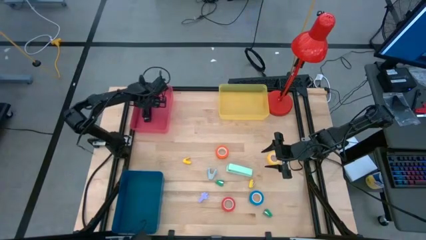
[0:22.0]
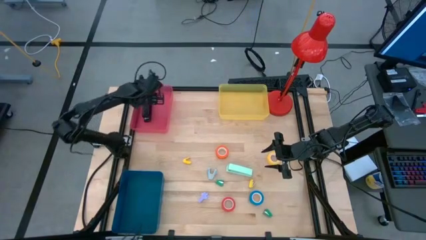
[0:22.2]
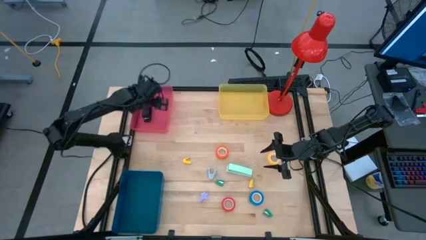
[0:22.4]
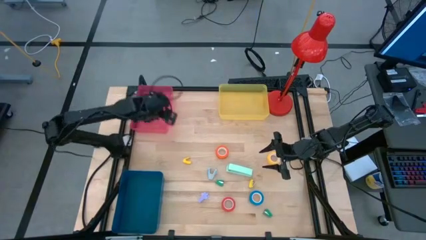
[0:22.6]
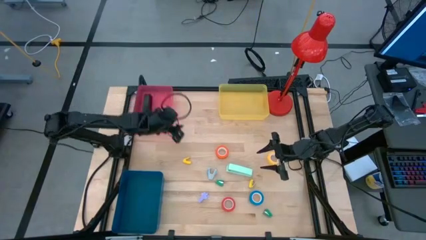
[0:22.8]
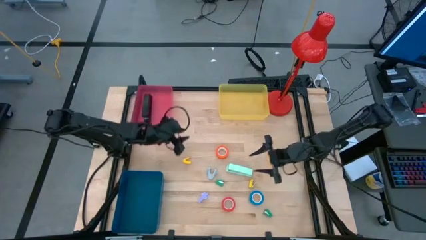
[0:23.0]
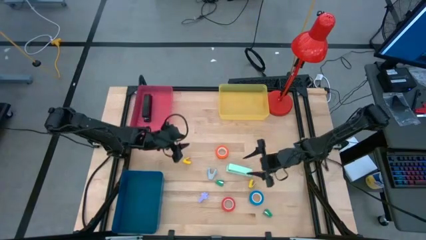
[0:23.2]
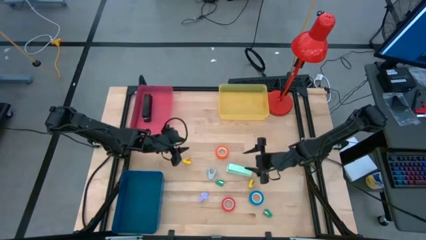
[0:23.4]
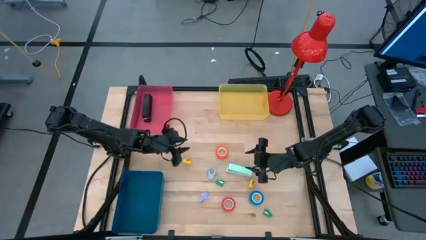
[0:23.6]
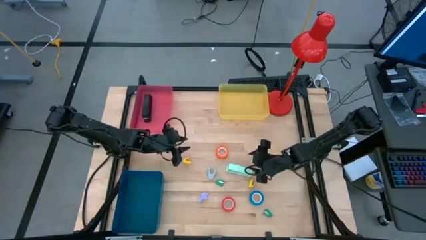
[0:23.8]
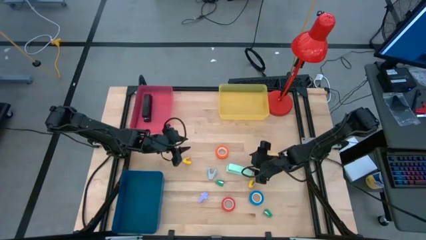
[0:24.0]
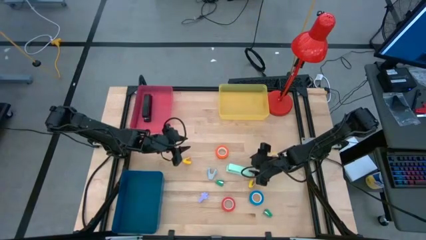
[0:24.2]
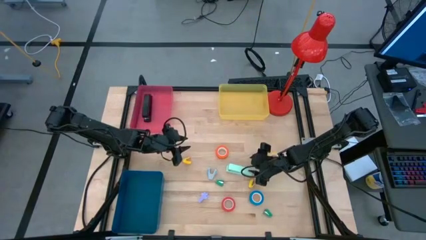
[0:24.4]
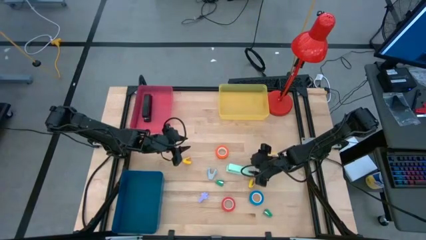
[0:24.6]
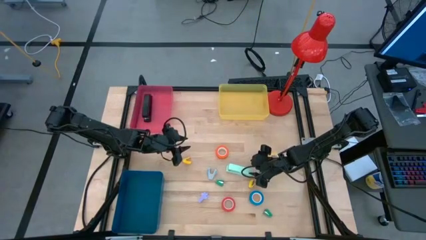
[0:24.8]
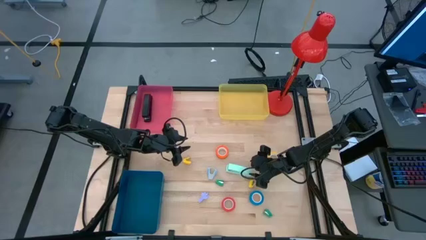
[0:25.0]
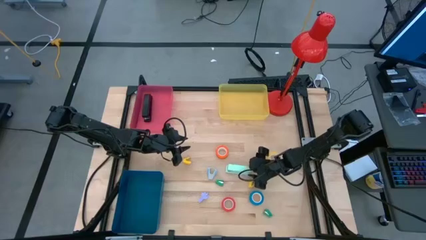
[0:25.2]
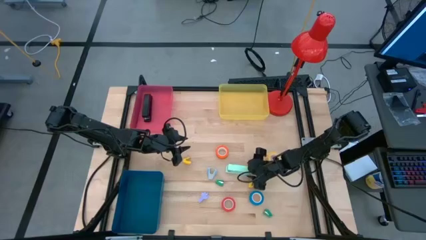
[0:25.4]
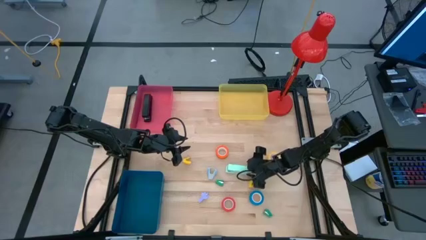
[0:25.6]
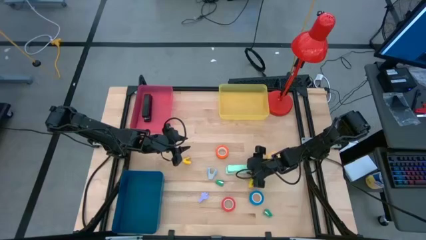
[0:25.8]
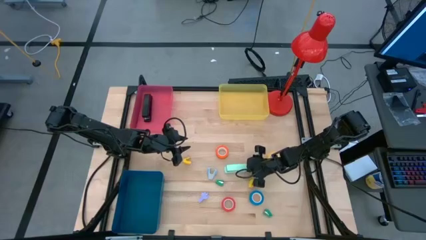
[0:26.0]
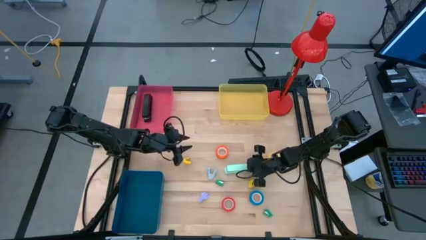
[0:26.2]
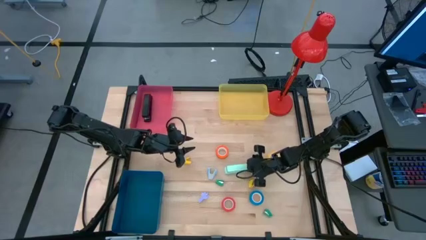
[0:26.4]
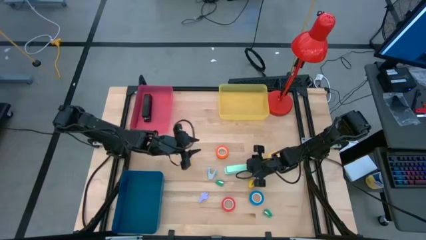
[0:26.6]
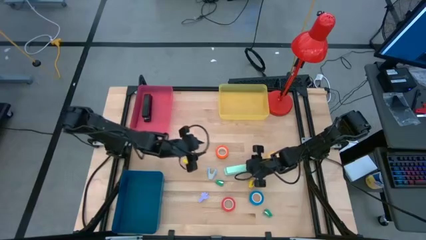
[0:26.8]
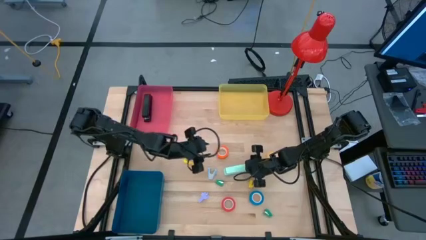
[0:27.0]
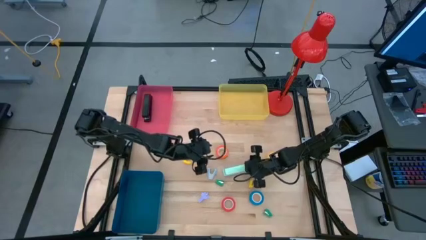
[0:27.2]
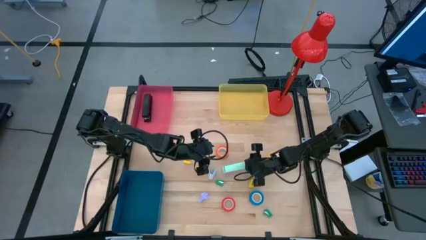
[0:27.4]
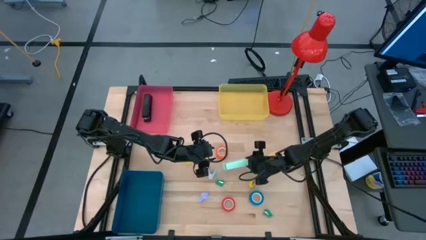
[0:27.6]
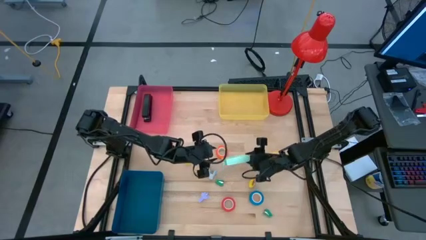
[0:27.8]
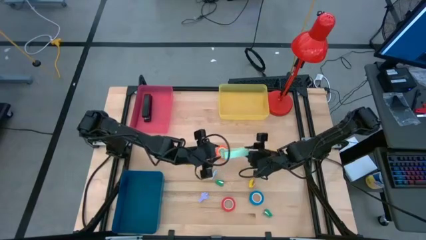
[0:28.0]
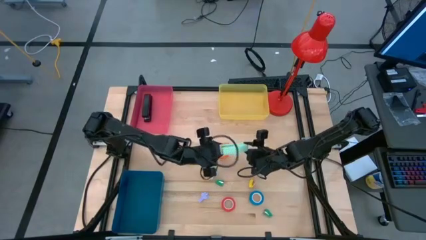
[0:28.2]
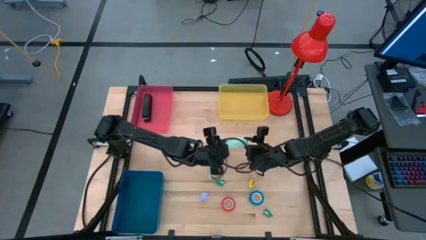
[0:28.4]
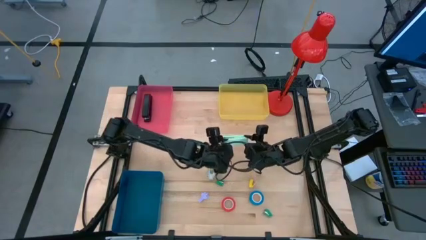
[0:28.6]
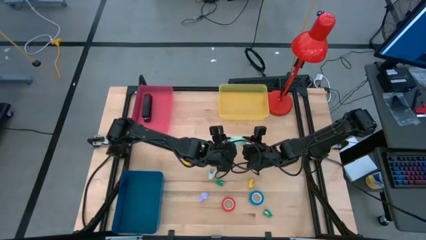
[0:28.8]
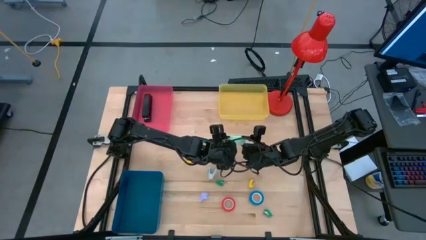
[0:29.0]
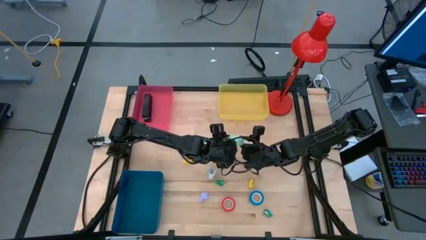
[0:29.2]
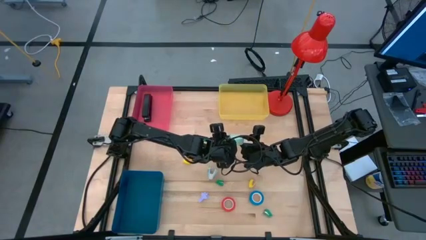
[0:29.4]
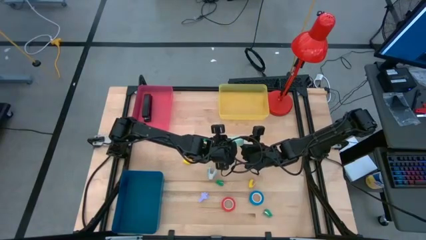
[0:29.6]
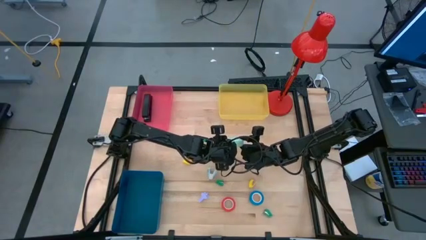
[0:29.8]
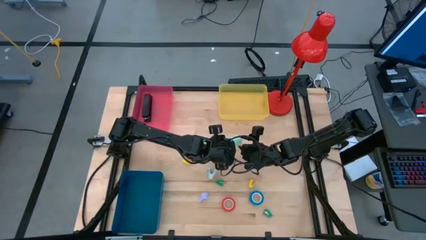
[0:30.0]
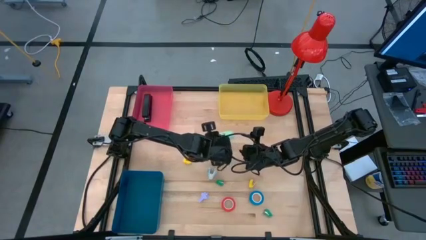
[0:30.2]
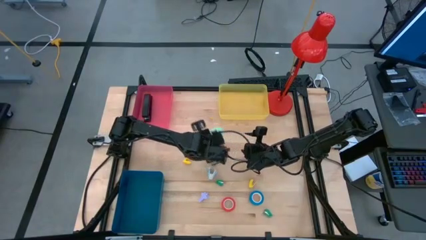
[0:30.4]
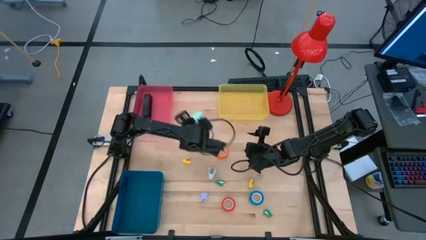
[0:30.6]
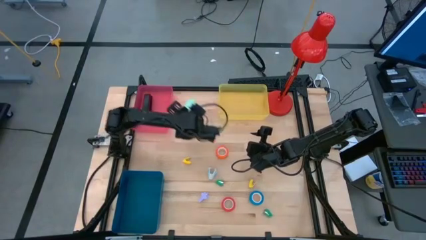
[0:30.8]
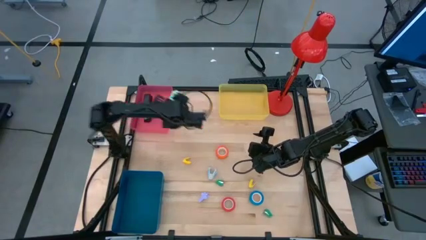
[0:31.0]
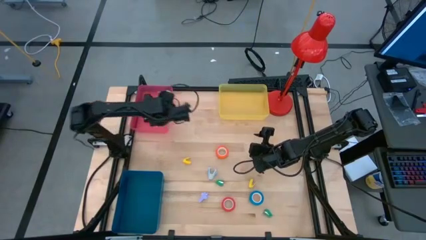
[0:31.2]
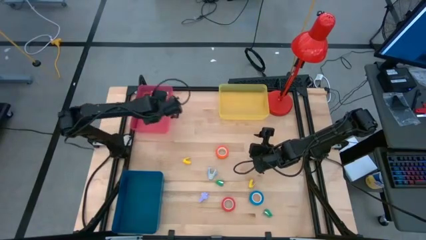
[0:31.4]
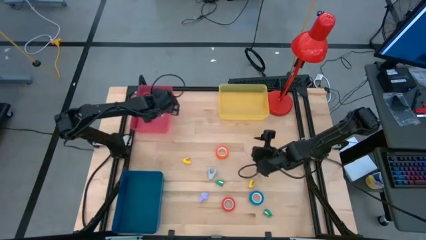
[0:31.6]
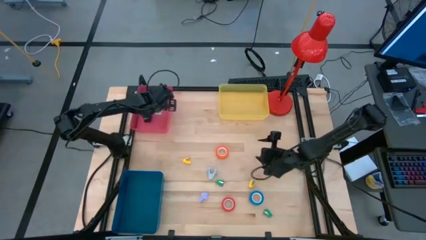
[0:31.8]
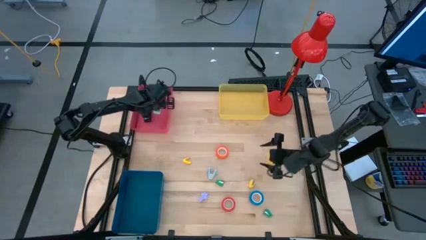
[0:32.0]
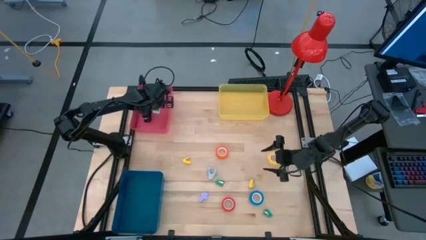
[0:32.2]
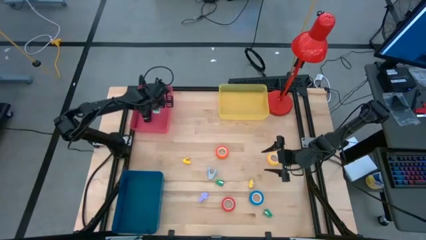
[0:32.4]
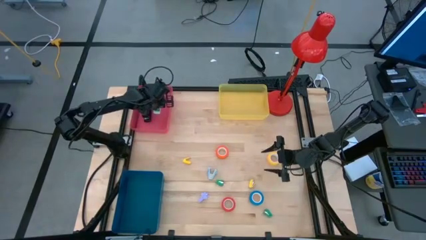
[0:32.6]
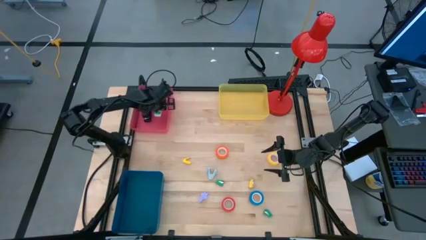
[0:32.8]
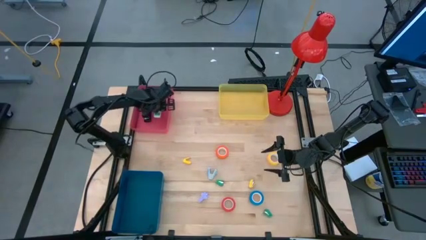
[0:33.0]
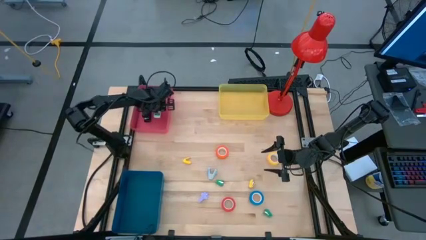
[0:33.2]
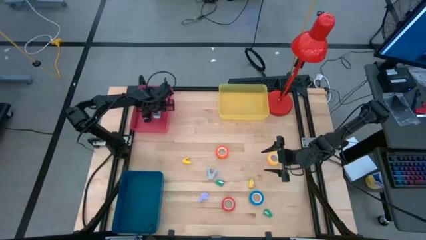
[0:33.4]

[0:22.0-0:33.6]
Task: Pick and place Stapler, Stapler remover, tape
Put the light blue stapler into the pink bin
